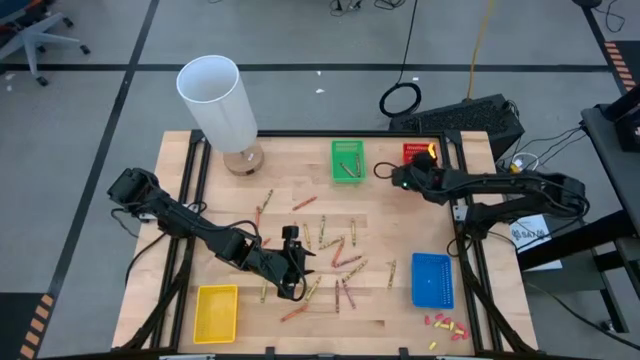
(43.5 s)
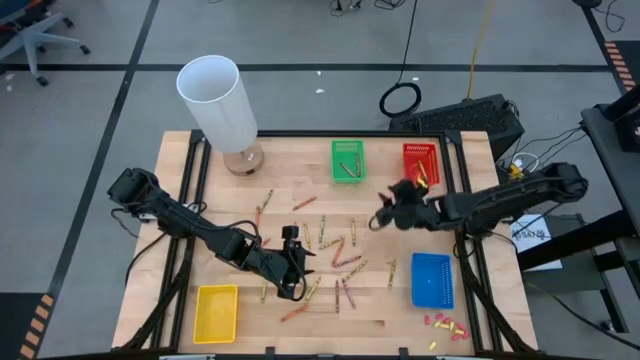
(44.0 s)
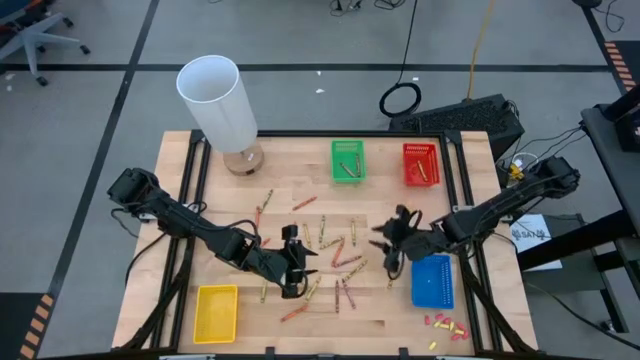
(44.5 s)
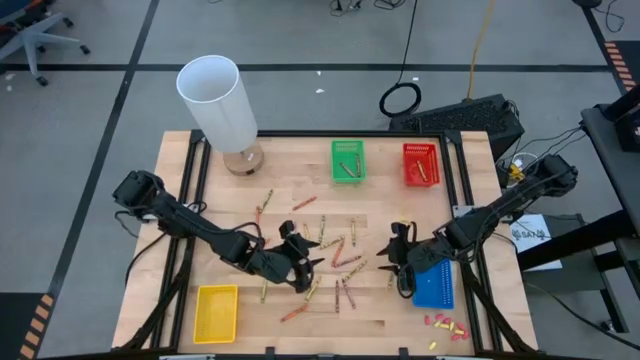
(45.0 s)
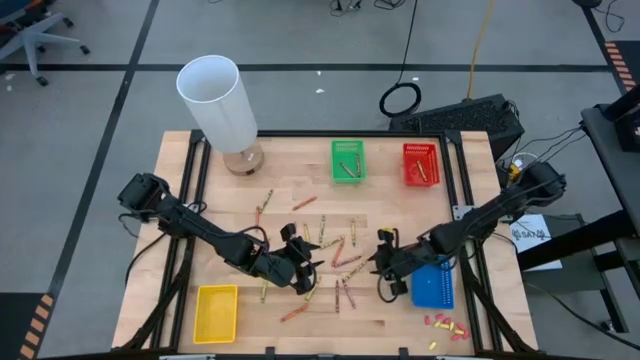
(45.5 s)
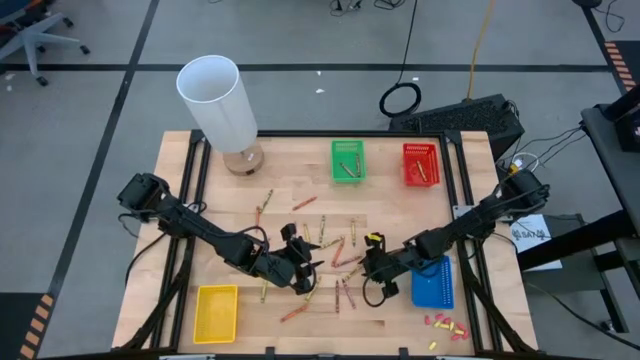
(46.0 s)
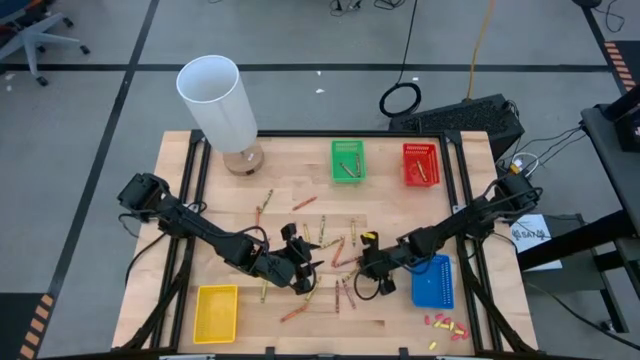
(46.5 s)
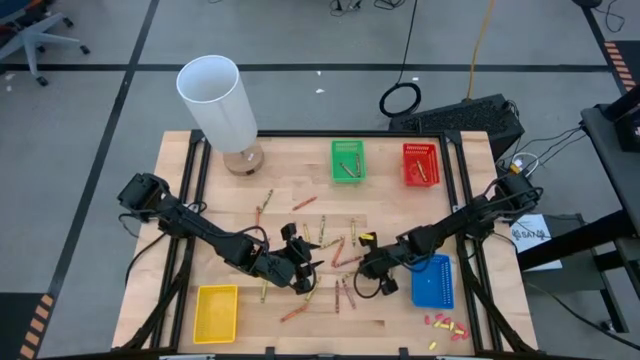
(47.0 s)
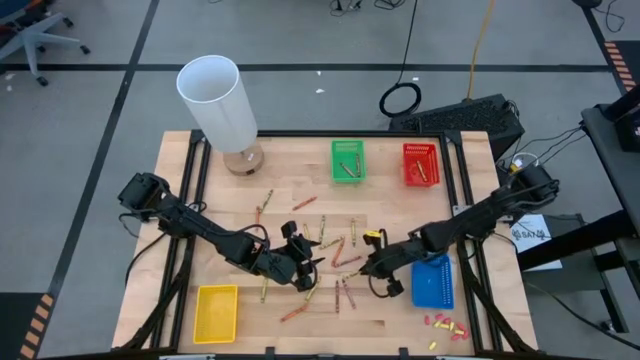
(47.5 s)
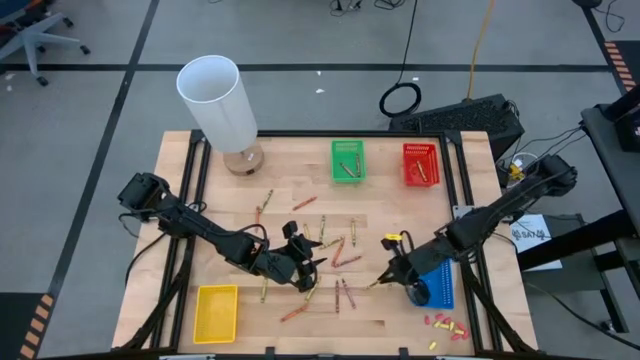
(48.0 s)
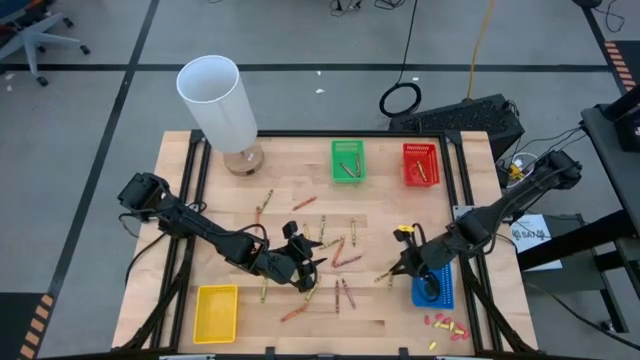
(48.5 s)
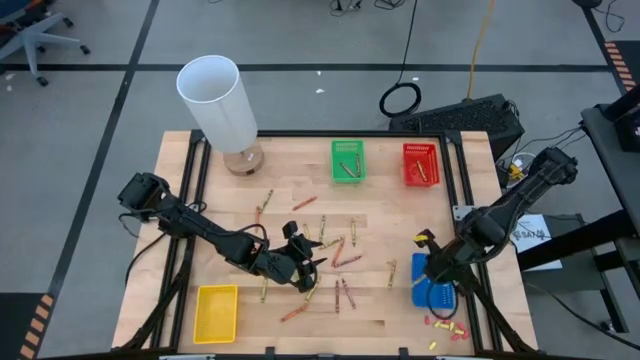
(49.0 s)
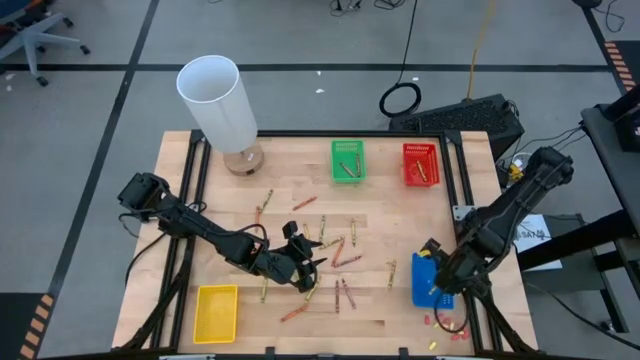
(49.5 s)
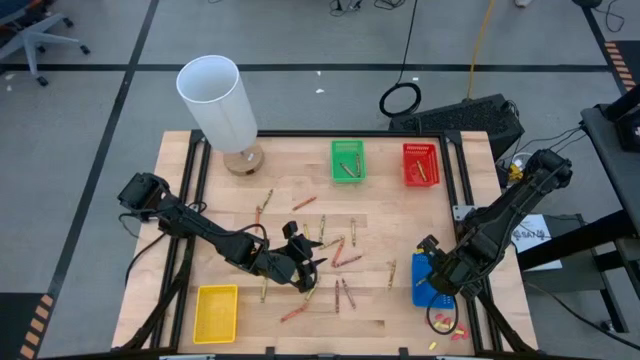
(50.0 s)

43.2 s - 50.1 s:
Task: Sort crayons
Put the yellow crayon into the blue bin

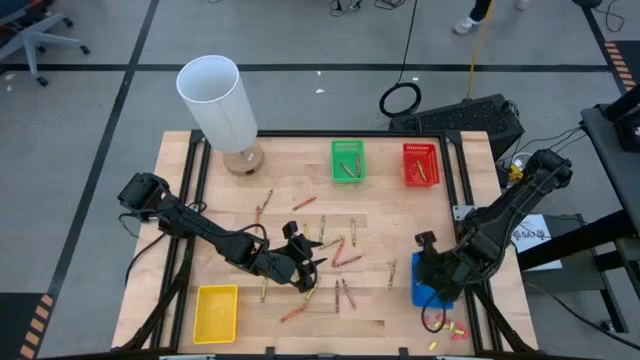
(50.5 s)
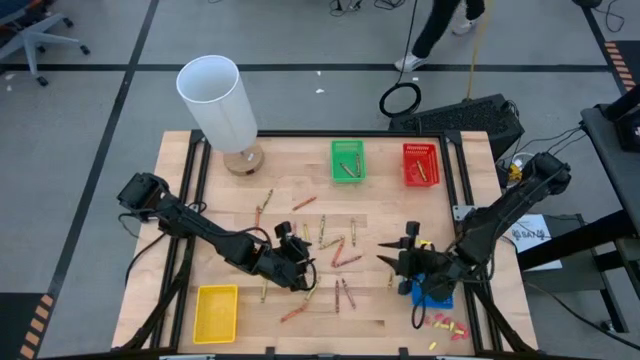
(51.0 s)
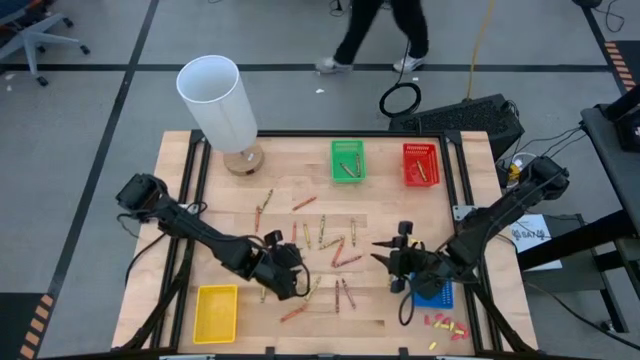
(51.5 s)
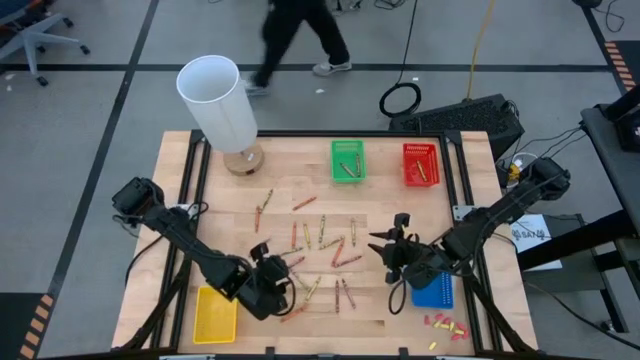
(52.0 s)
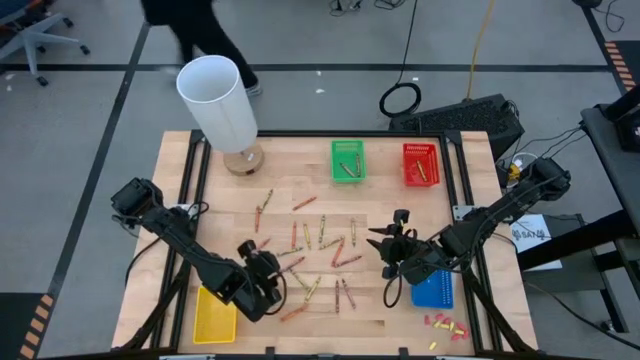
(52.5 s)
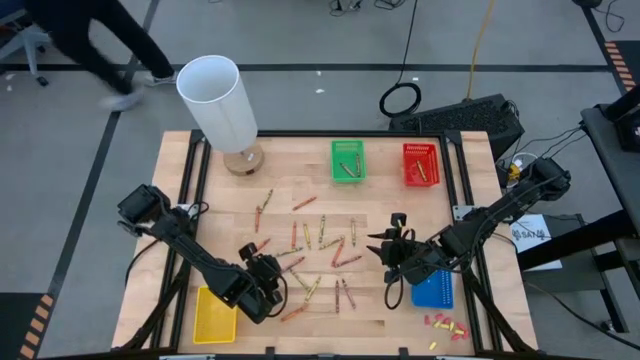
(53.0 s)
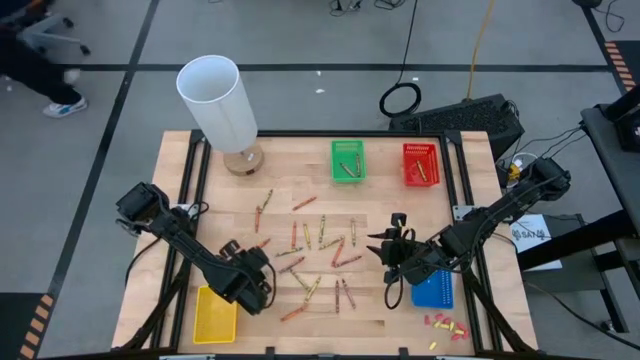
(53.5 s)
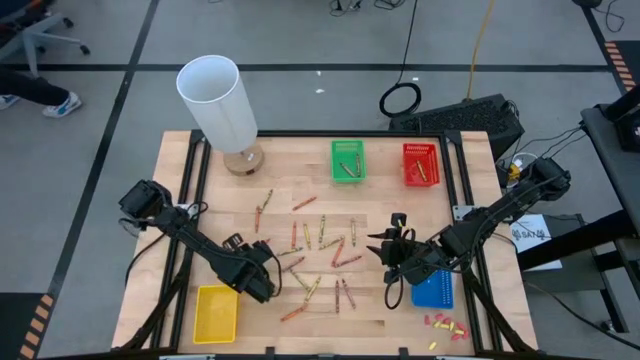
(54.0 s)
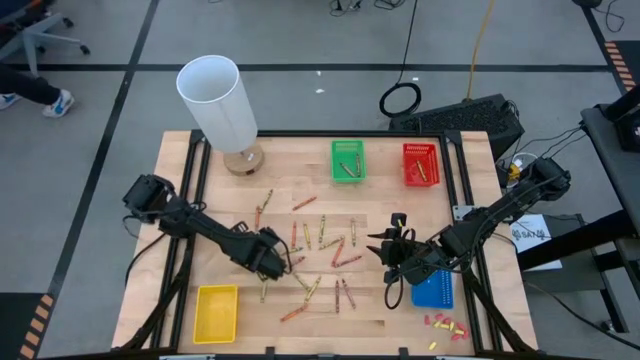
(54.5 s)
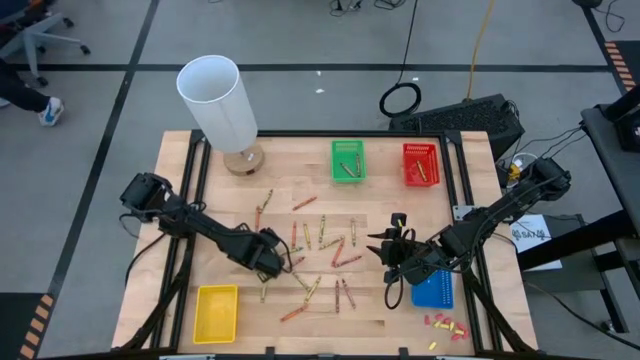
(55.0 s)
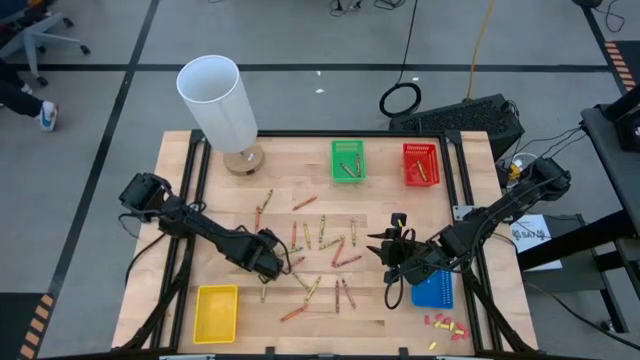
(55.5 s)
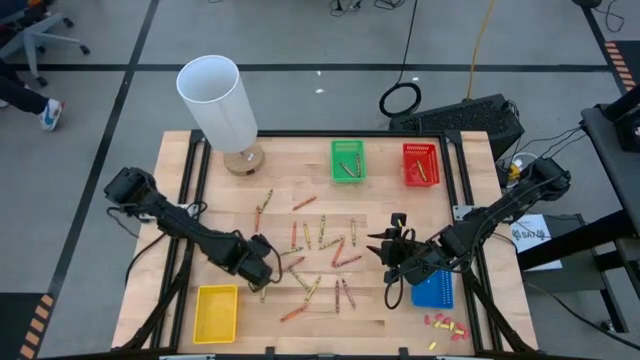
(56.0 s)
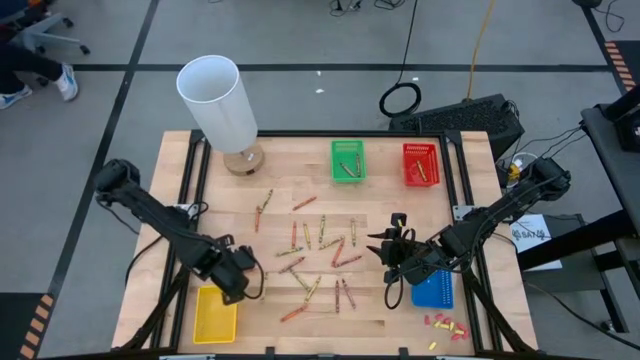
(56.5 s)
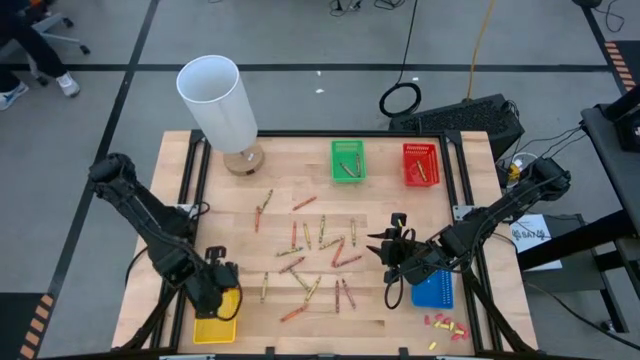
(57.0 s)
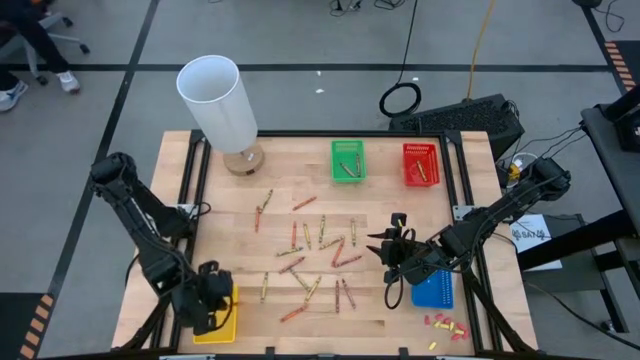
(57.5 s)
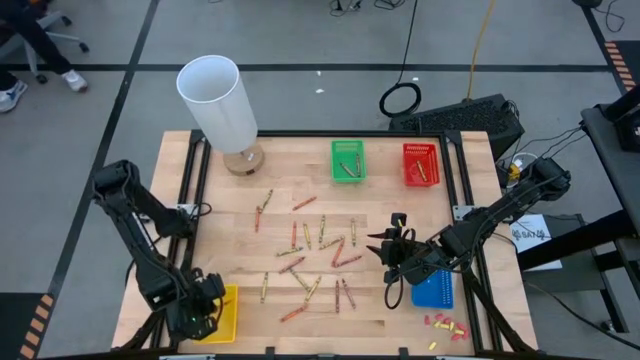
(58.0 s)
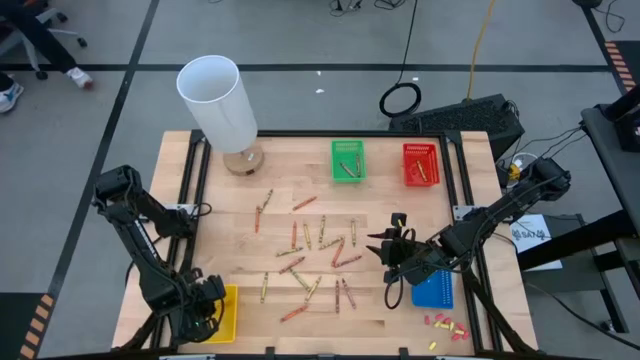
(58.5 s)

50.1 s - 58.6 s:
Put the orange crayon into the yellow bin

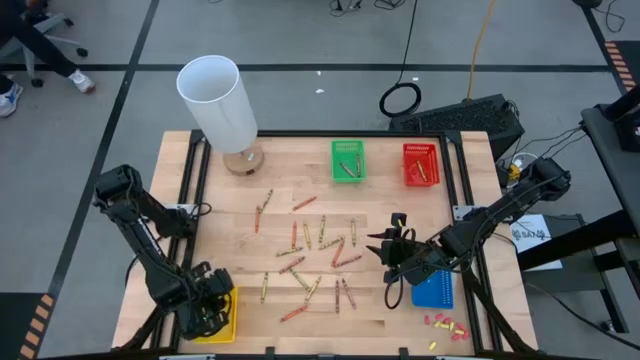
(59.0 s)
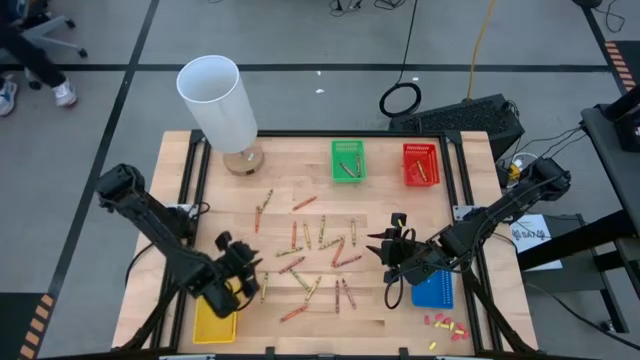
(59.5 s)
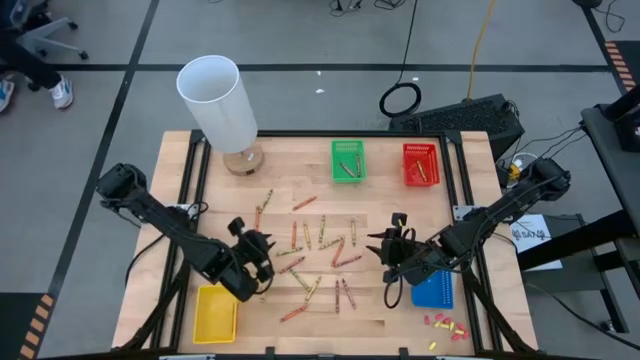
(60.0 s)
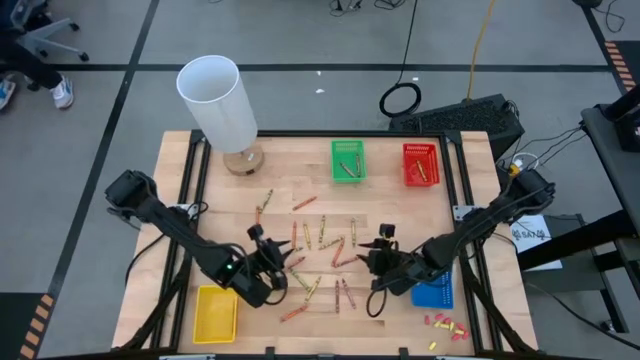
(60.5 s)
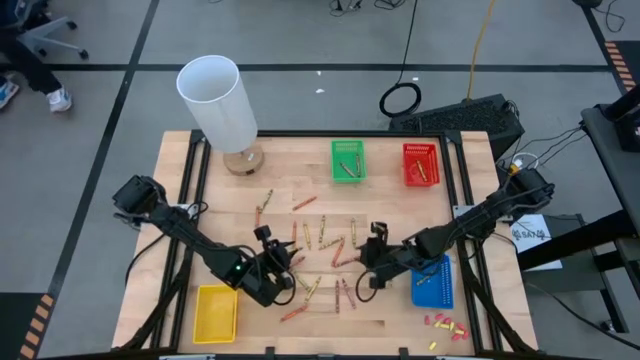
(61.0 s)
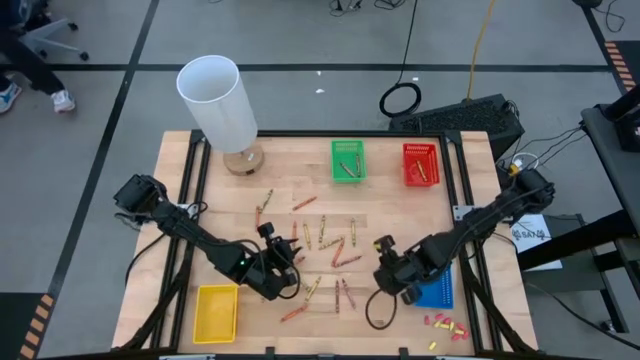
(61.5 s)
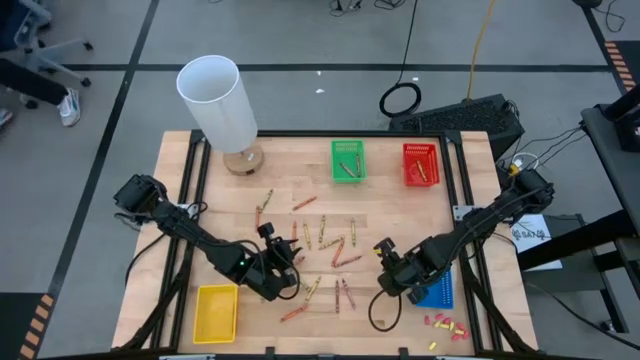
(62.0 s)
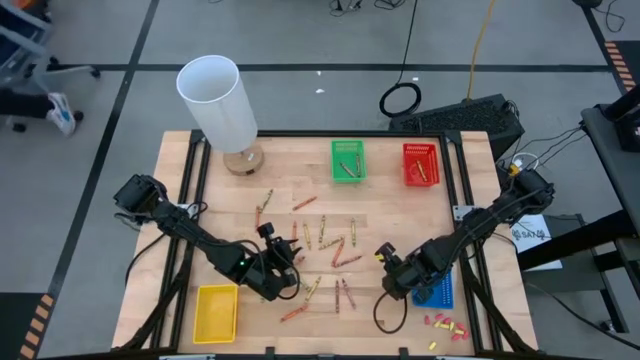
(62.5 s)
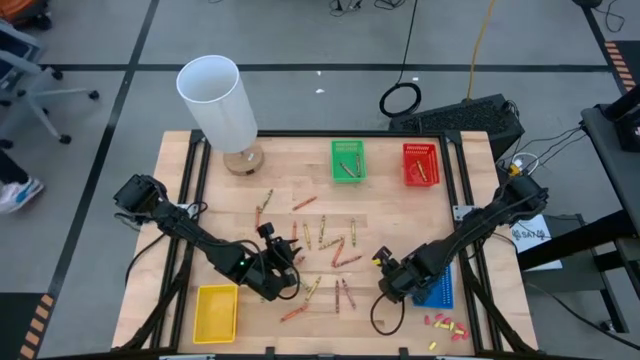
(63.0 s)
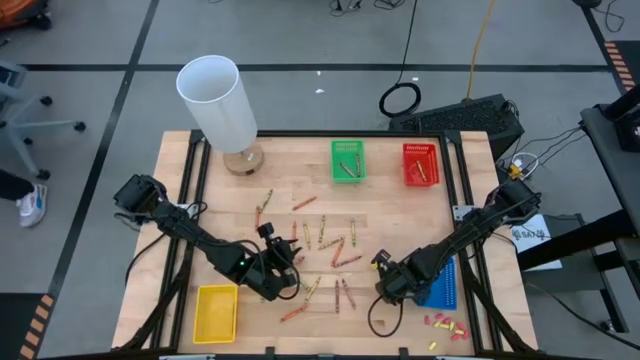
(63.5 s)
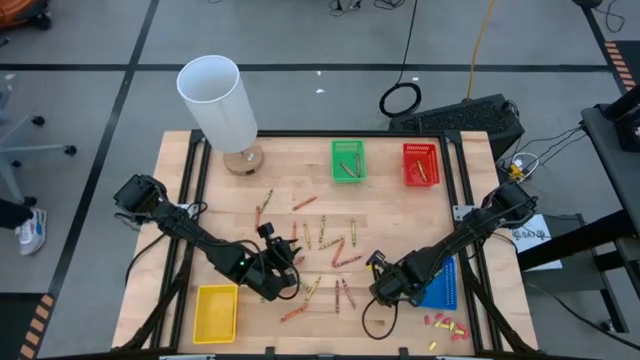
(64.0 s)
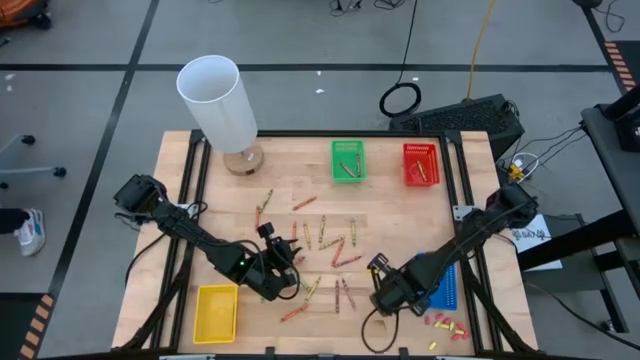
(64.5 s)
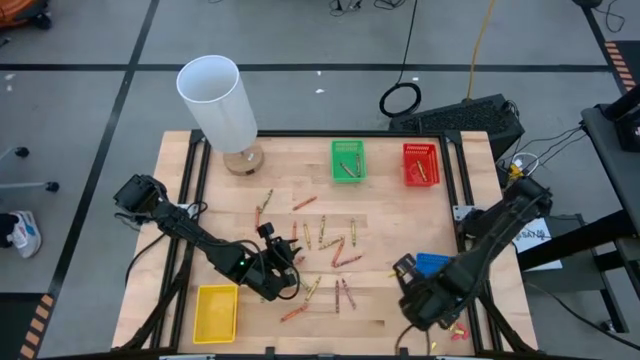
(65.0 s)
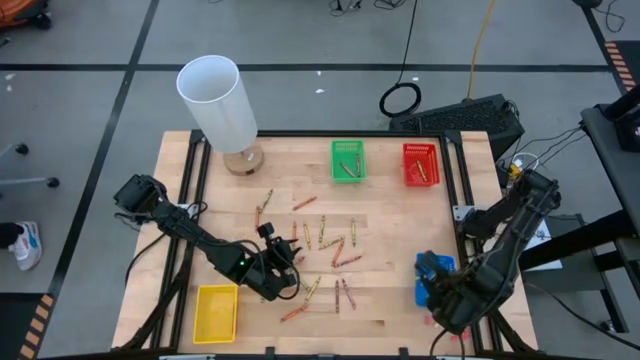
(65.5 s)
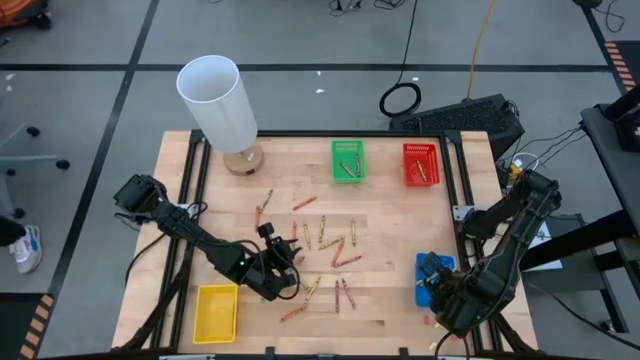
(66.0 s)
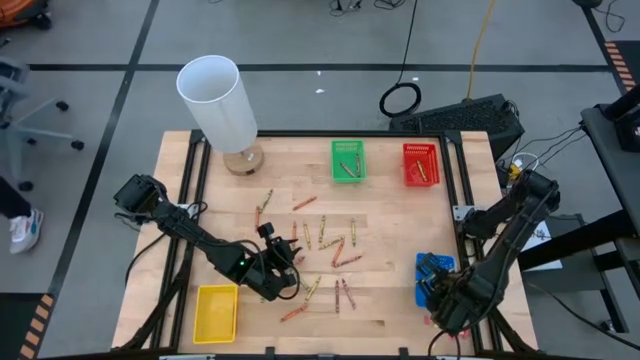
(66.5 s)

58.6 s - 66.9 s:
Put the yellow crayon into the blue bin
